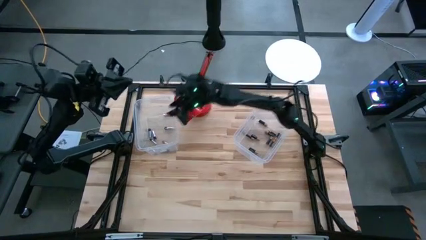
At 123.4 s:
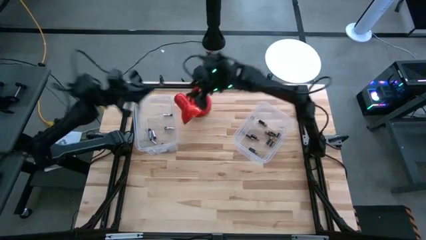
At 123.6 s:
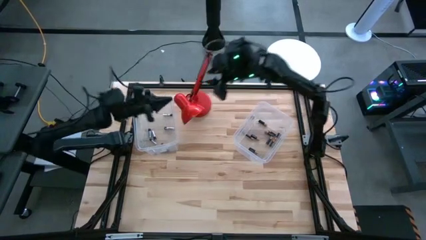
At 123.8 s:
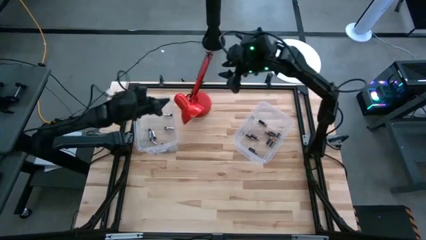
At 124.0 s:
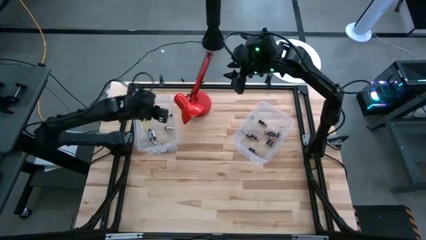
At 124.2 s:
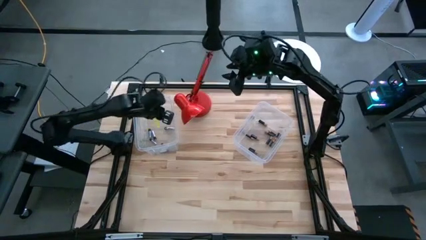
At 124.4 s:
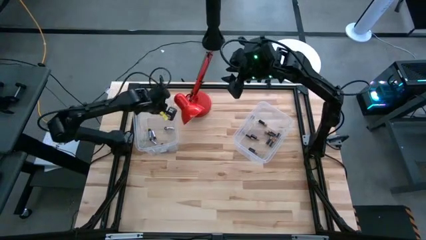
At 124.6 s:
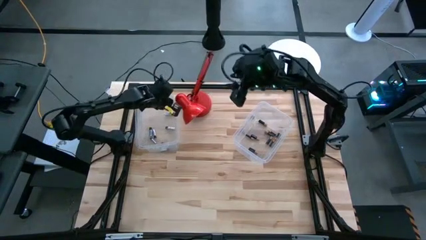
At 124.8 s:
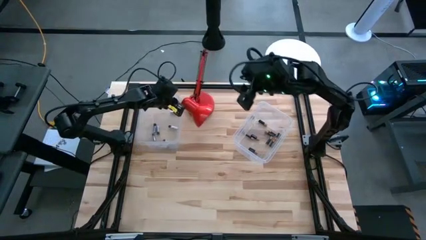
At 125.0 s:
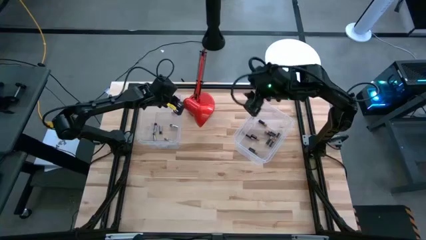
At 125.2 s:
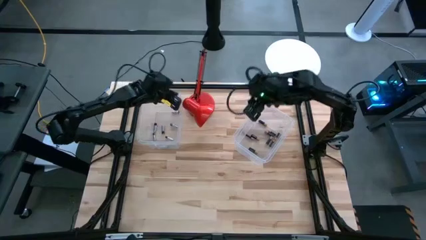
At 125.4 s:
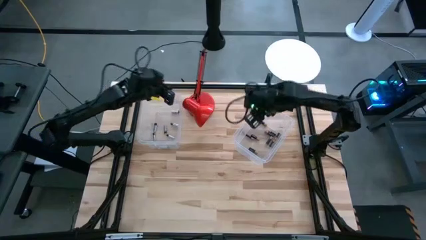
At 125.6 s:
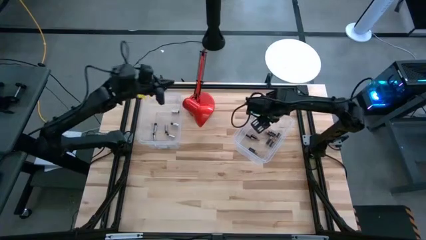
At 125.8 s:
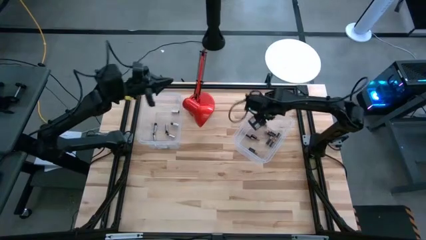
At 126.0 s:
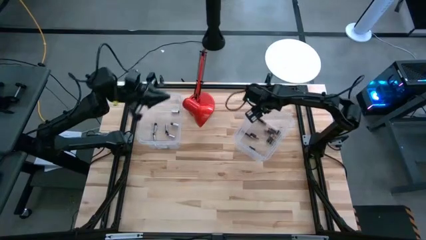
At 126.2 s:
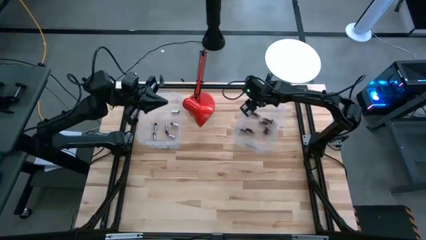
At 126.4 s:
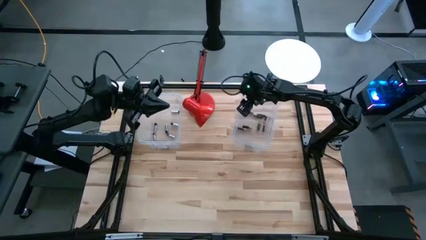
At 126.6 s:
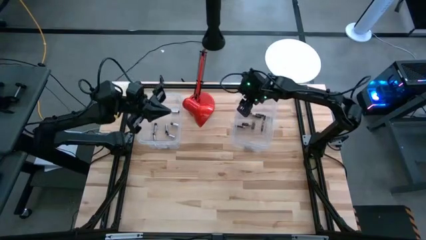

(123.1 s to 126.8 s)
Task: Sort batteries
Adjust the right transparent bin

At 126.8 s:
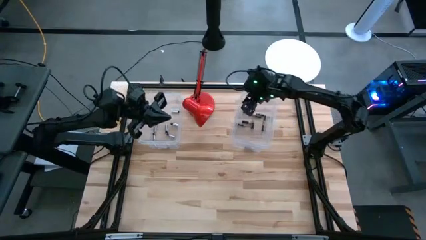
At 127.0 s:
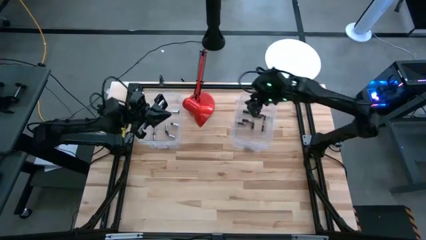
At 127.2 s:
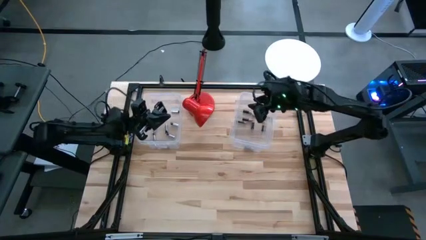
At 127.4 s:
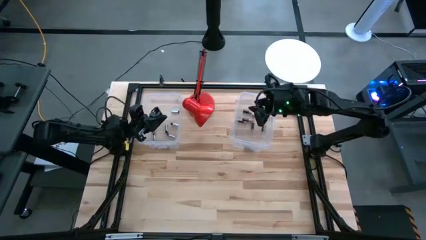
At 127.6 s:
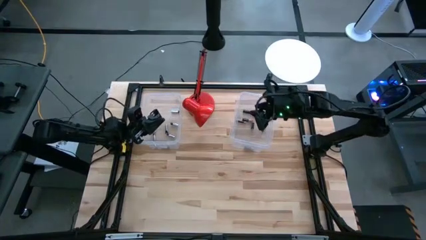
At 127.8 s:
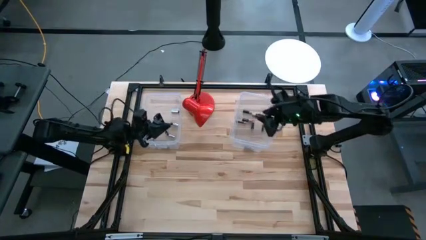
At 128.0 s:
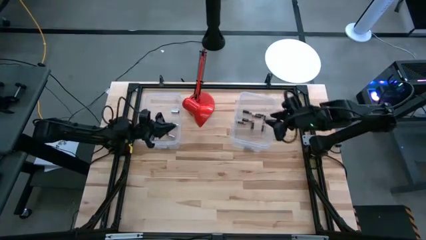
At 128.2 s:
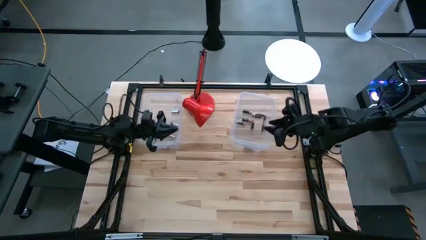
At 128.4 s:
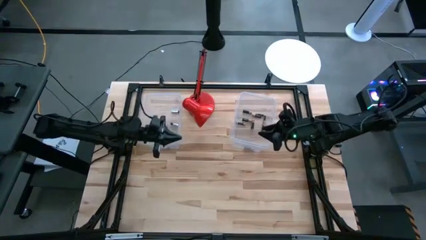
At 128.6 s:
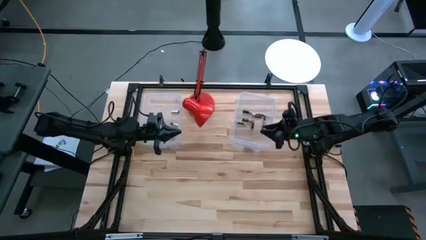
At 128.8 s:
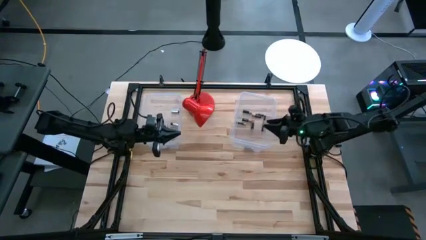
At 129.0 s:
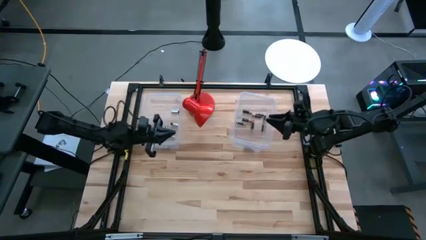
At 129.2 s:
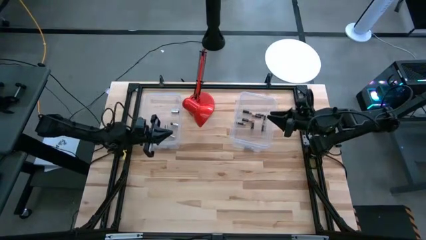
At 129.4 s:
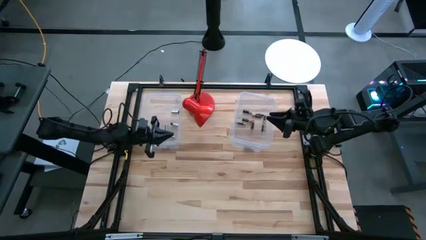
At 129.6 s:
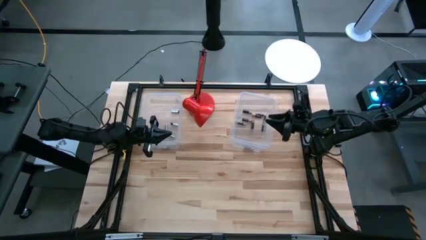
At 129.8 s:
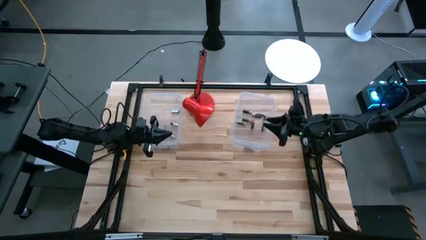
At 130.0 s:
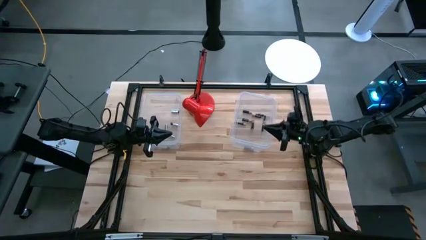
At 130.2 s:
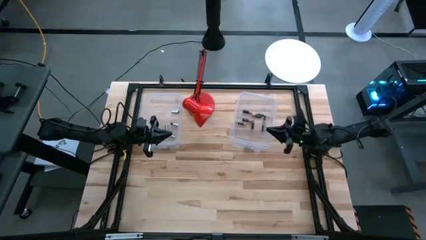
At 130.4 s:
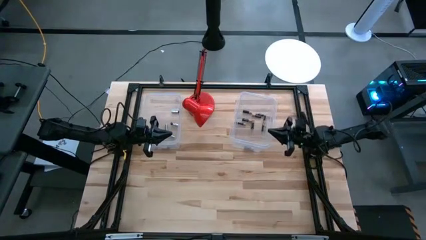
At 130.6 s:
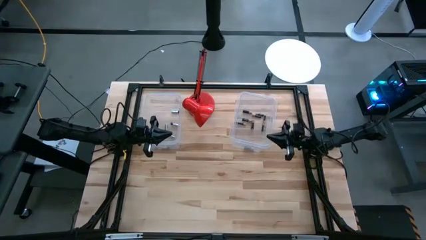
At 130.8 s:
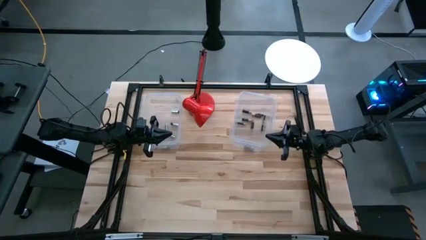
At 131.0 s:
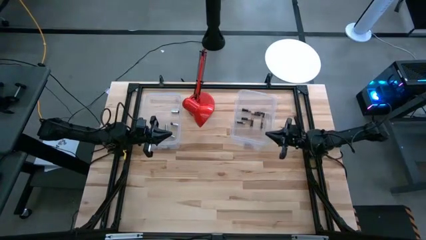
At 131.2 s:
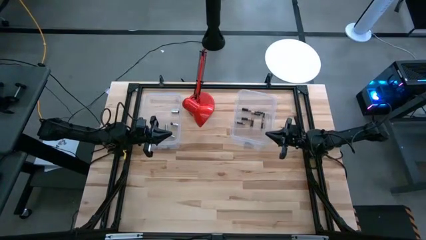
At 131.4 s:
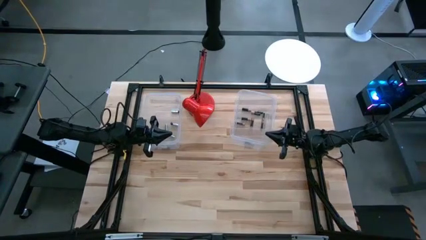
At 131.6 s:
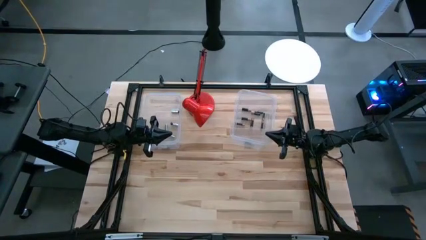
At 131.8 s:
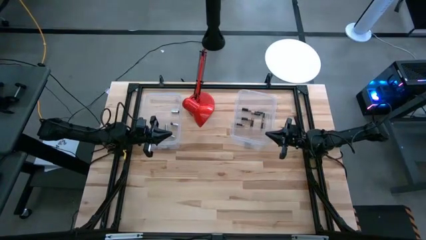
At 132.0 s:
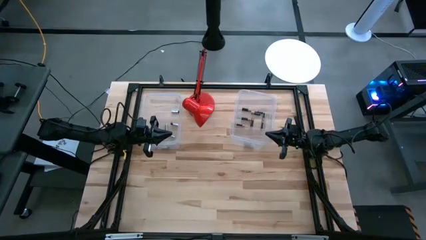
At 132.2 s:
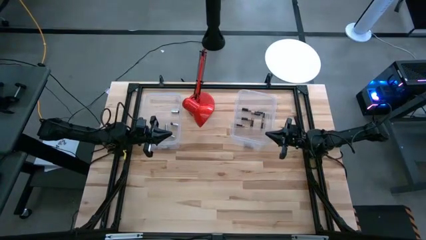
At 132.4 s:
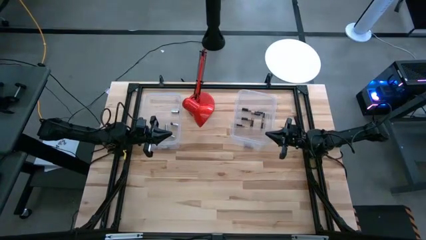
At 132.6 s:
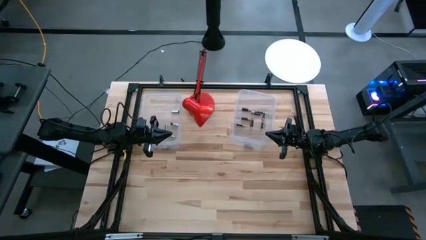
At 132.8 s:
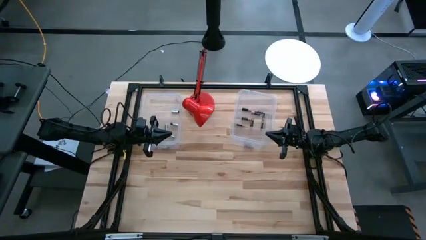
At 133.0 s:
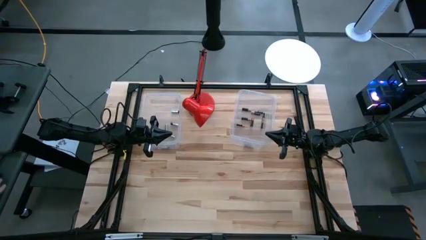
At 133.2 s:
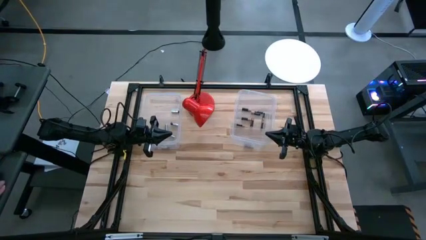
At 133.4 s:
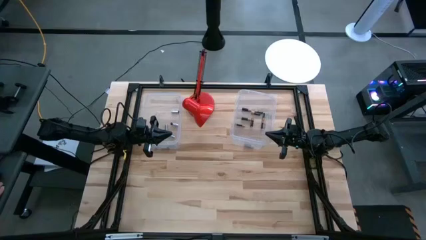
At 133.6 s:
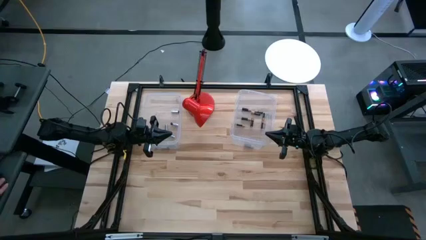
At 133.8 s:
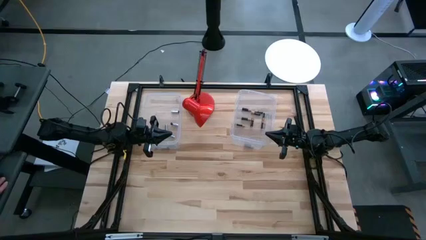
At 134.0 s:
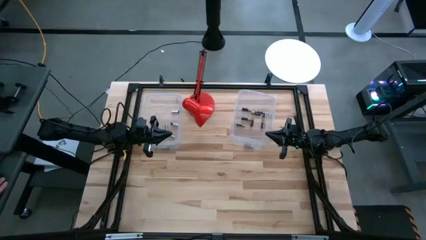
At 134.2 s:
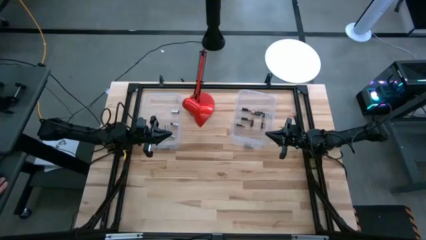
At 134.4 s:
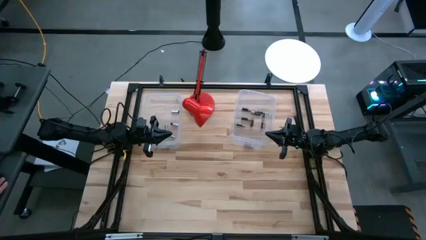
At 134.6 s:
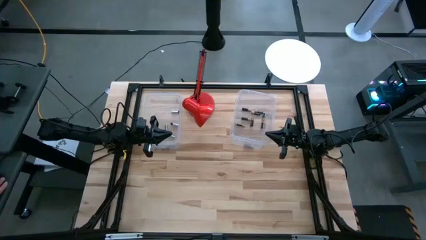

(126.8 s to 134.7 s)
Return to Home Position
